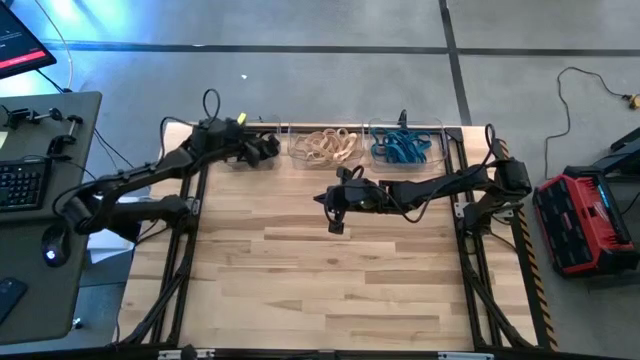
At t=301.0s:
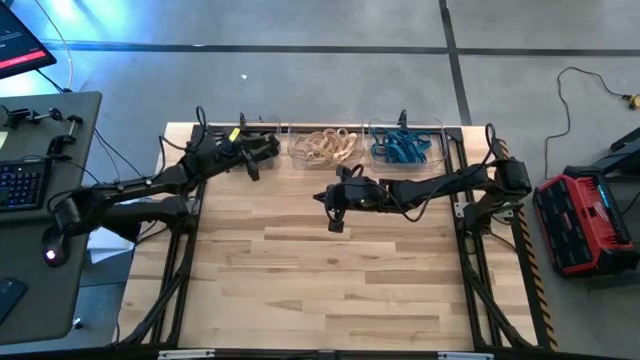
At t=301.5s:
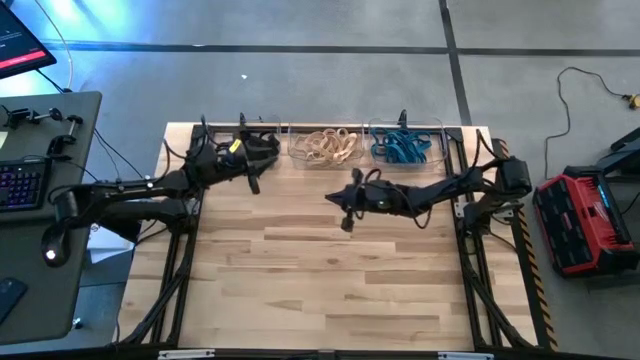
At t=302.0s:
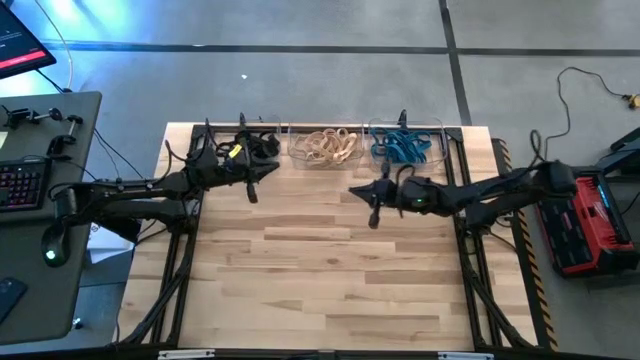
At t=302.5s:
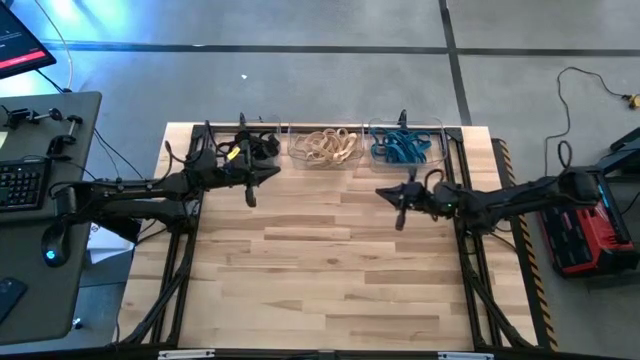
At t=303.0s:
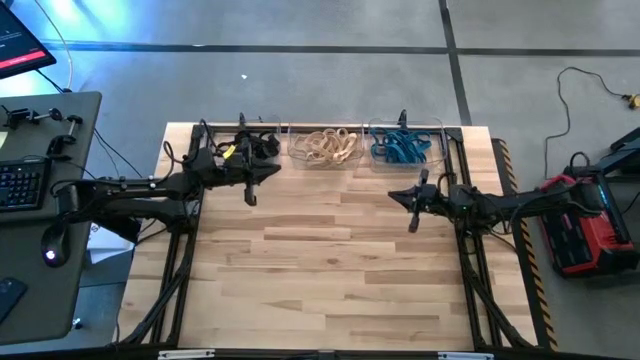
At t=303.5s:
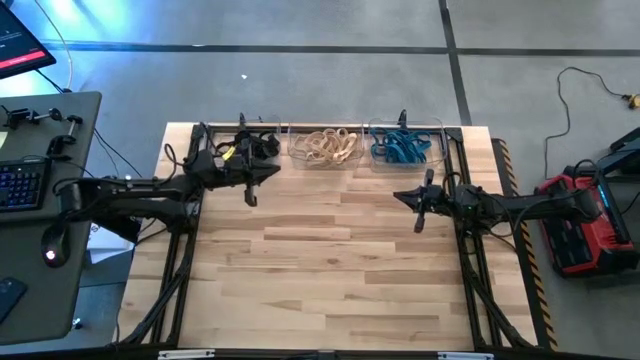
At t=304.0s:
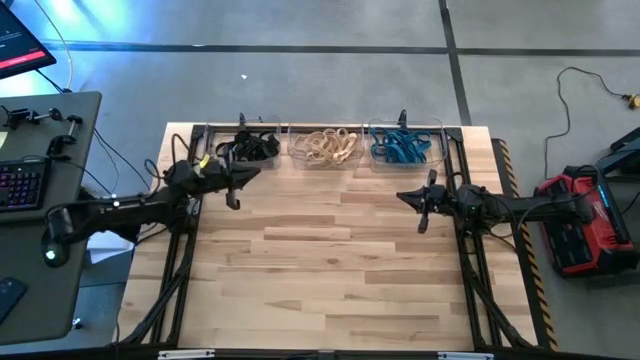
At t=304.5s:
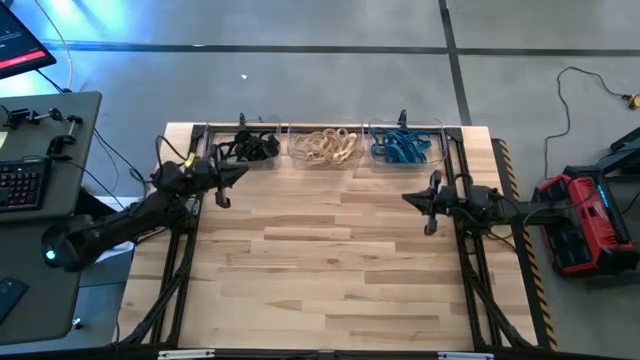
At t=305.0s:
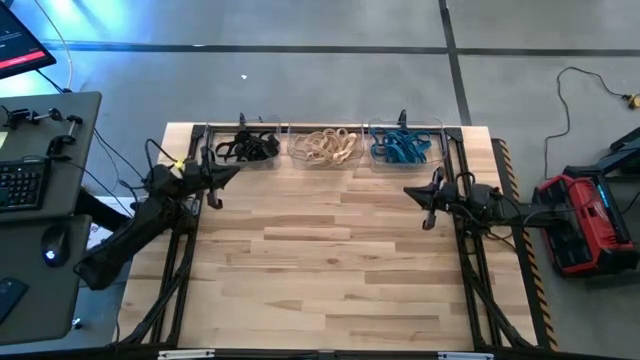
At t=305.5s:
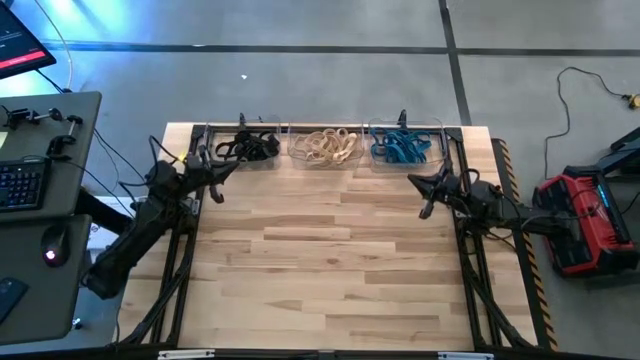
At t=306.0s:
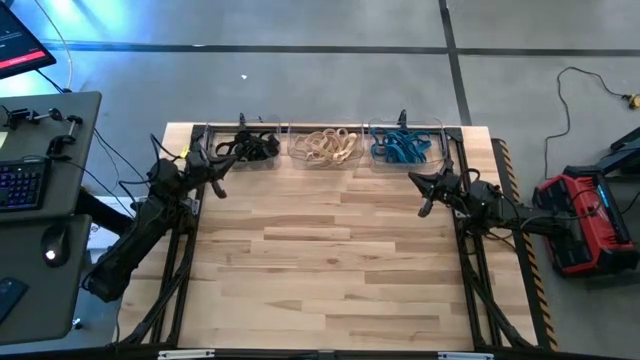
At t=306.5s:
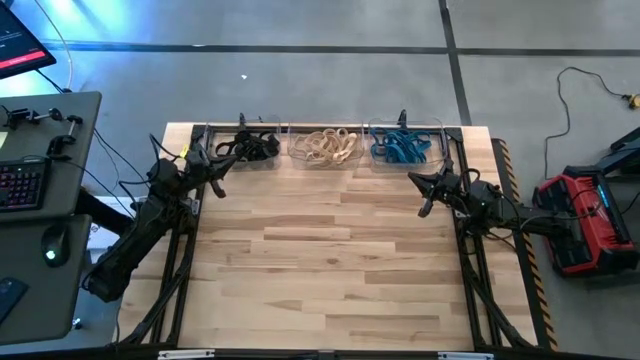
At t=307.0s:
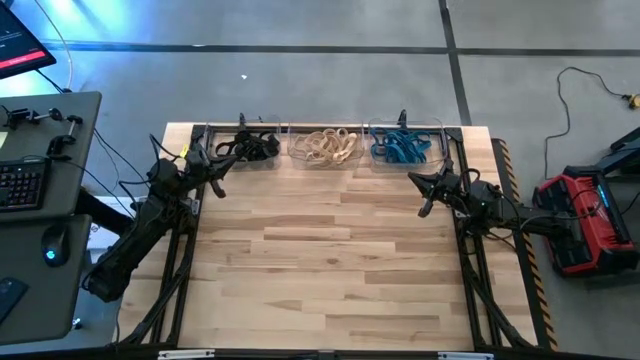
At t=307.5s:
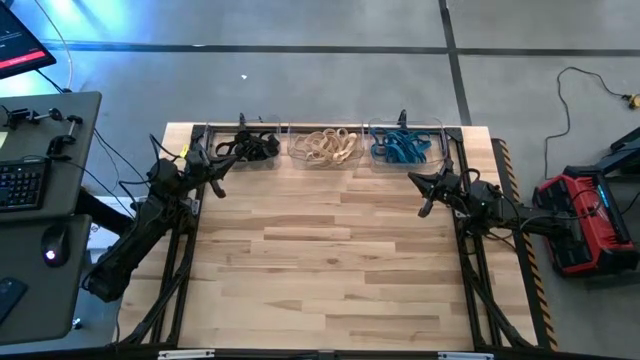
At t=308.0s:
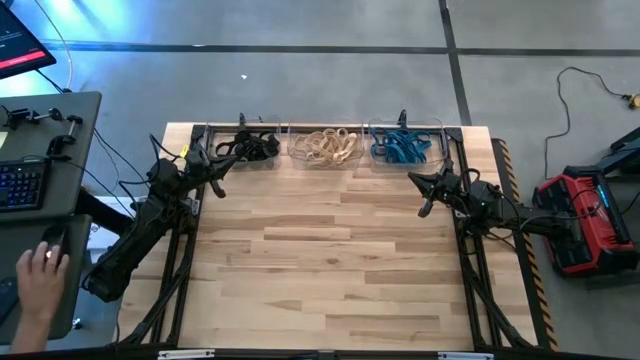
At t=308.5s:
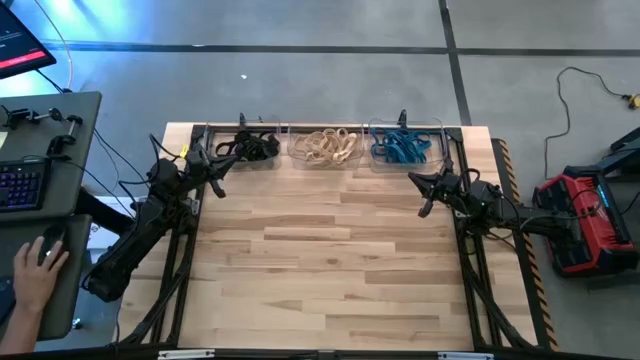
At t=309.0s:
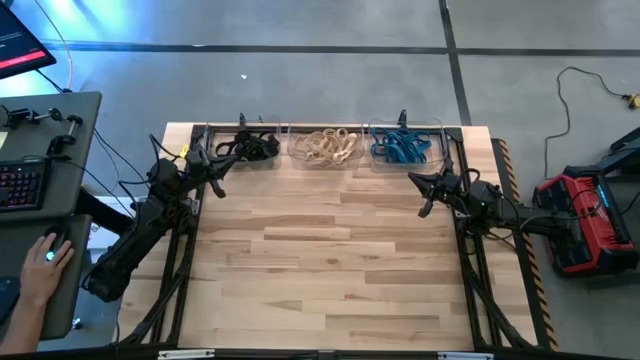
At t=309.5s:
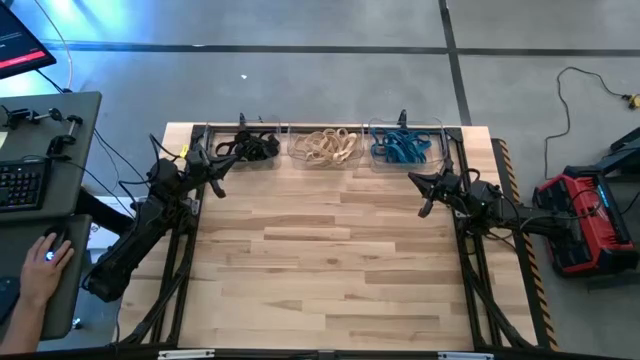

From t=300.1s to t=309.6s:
Task: Sort rubber bands into baskets
Return to Home Position

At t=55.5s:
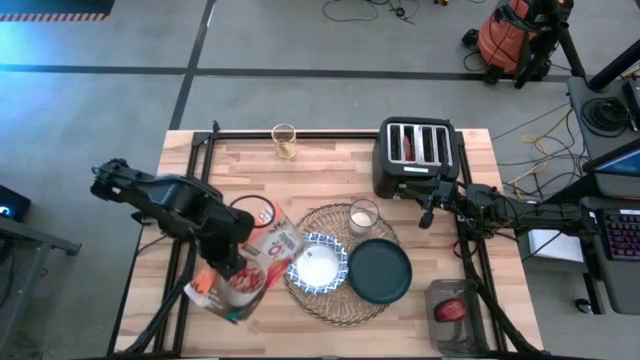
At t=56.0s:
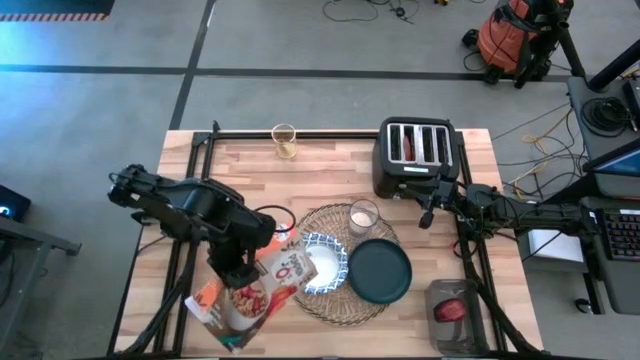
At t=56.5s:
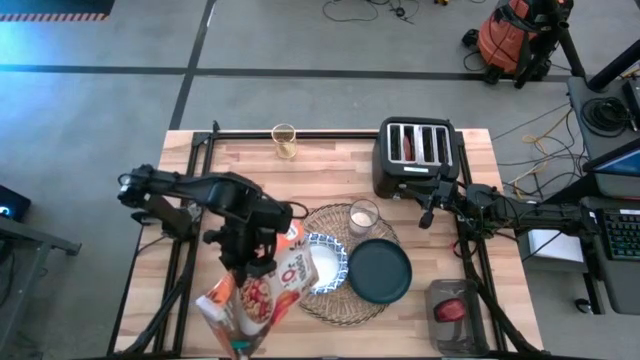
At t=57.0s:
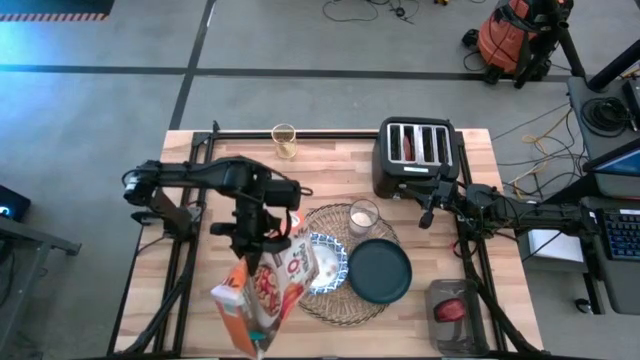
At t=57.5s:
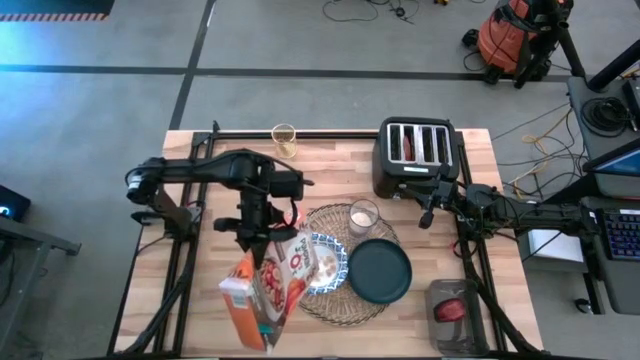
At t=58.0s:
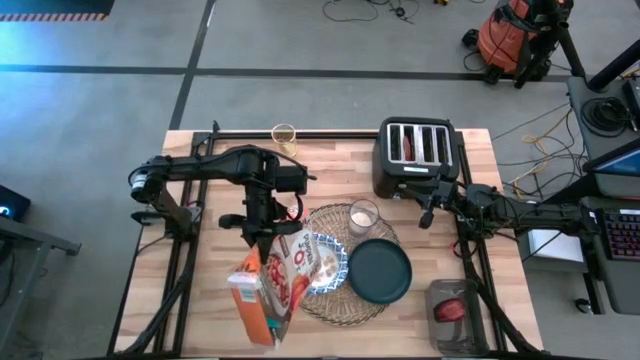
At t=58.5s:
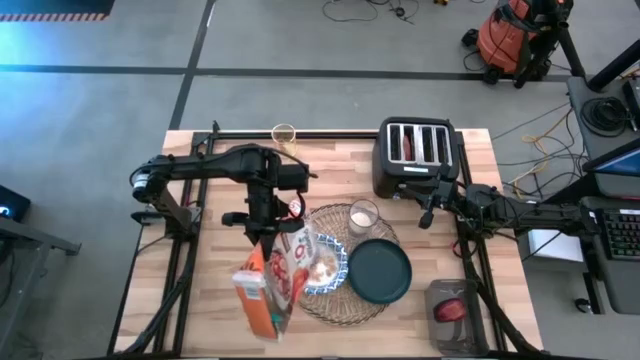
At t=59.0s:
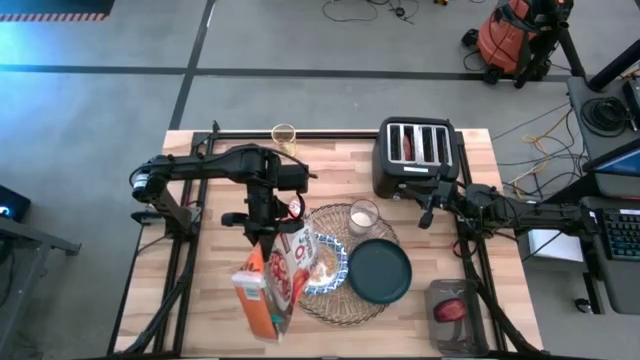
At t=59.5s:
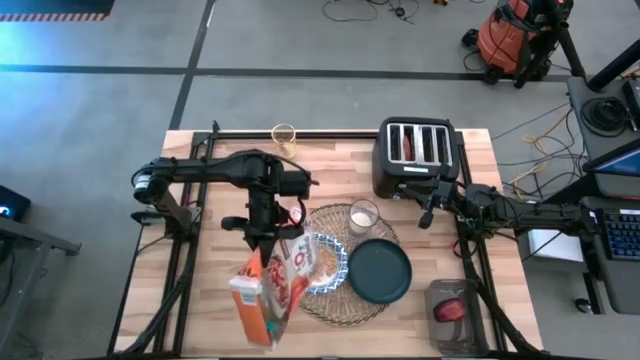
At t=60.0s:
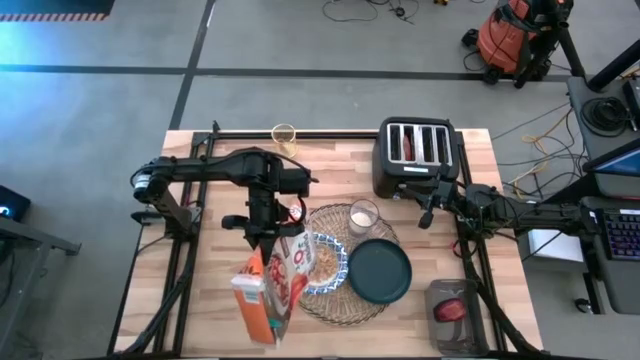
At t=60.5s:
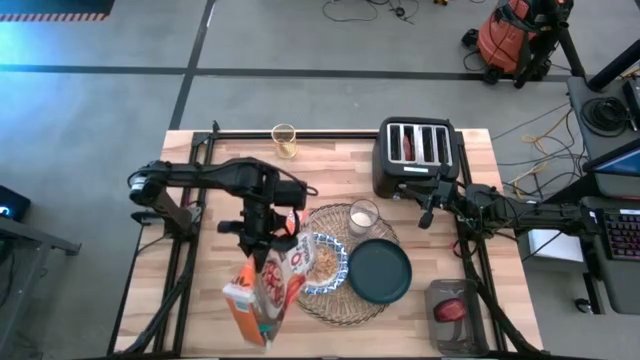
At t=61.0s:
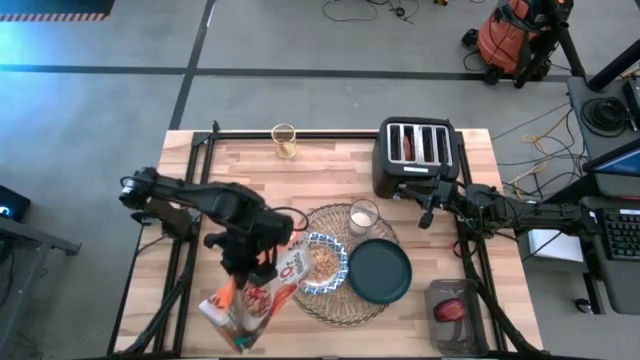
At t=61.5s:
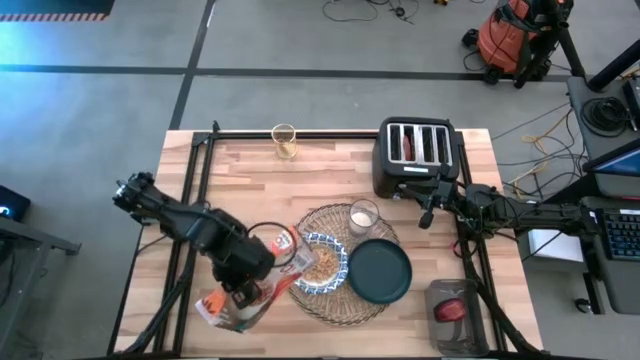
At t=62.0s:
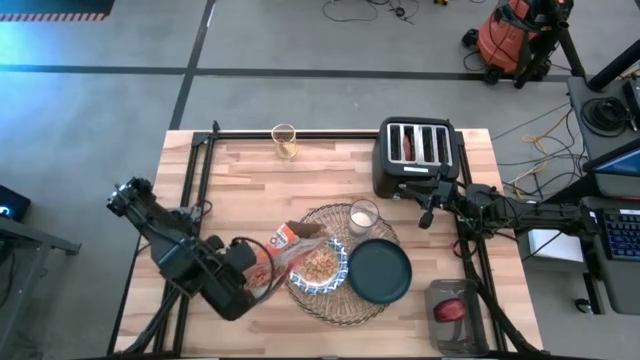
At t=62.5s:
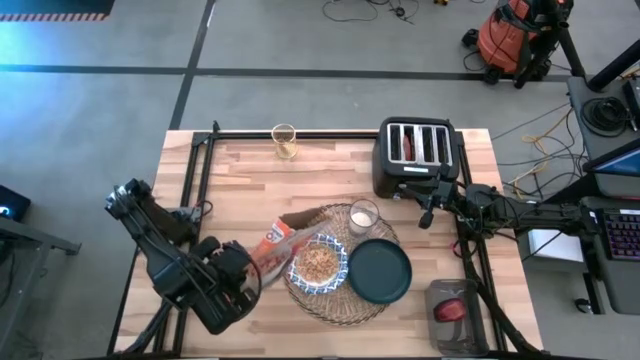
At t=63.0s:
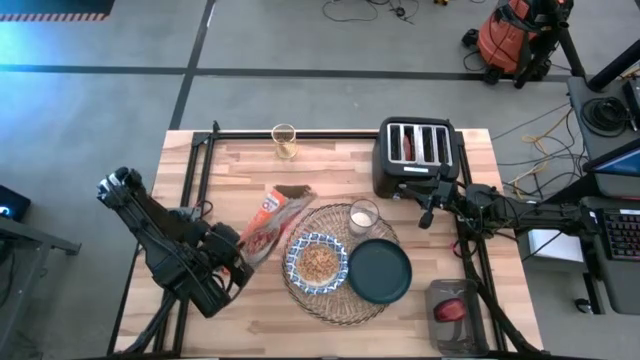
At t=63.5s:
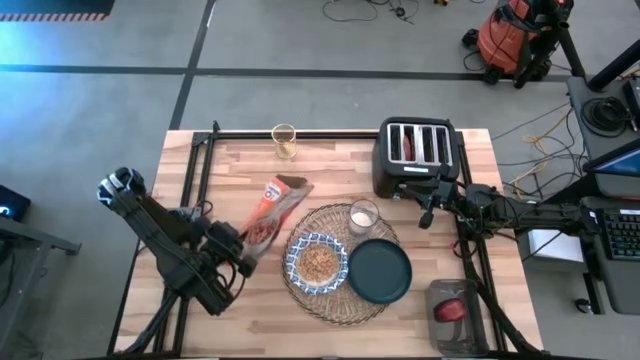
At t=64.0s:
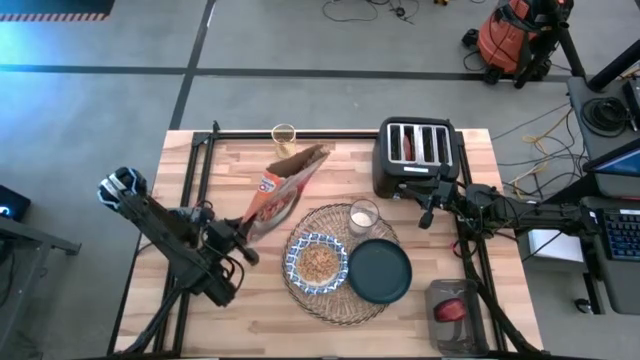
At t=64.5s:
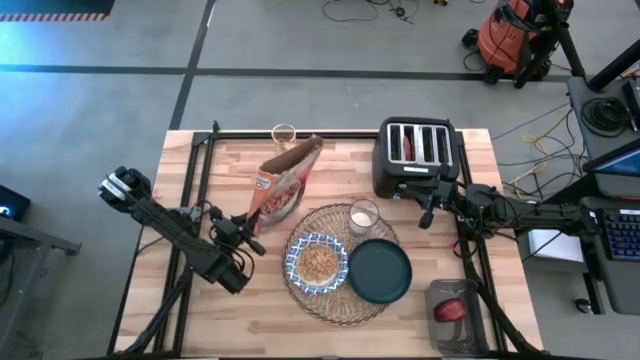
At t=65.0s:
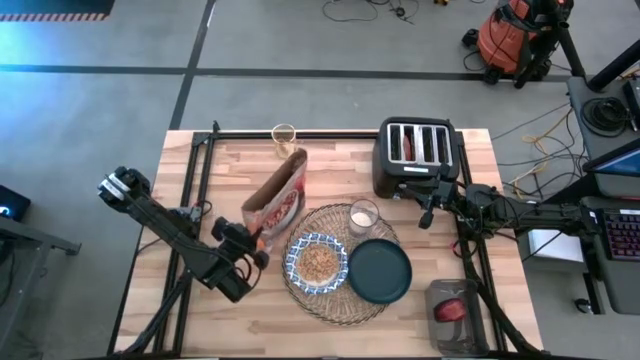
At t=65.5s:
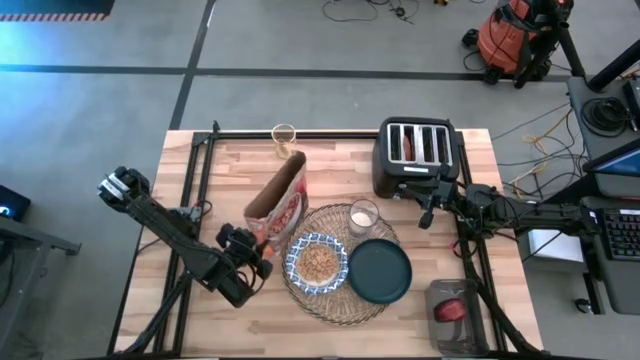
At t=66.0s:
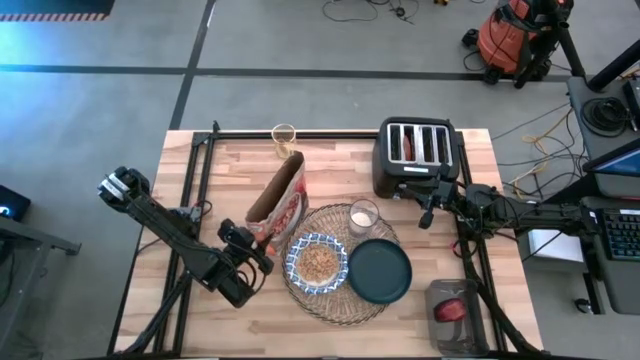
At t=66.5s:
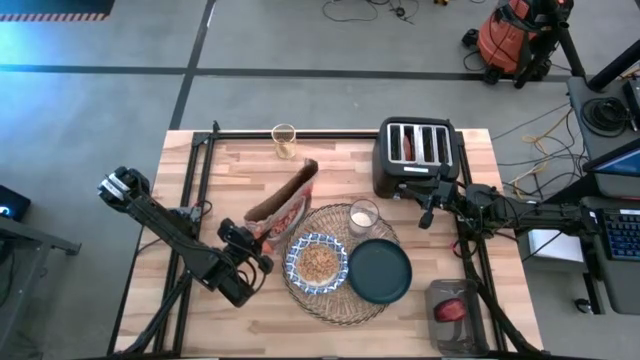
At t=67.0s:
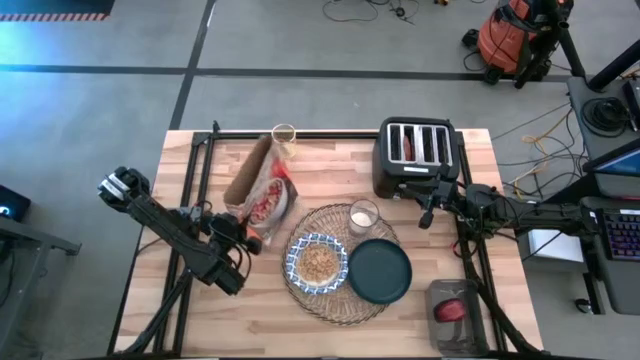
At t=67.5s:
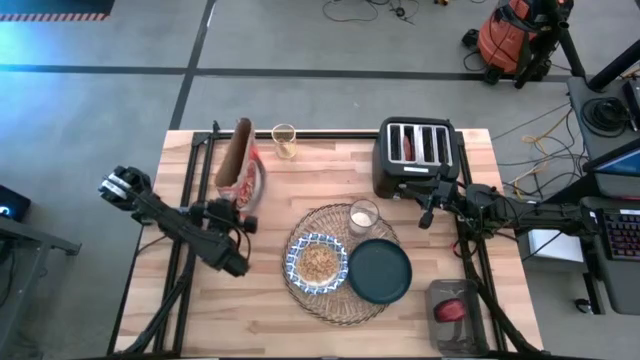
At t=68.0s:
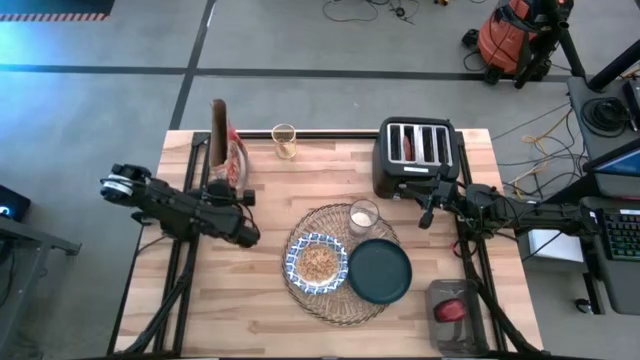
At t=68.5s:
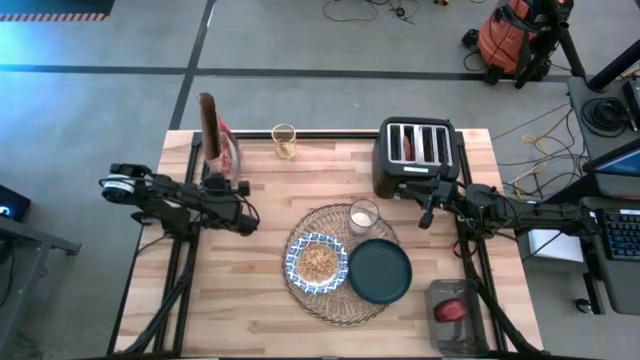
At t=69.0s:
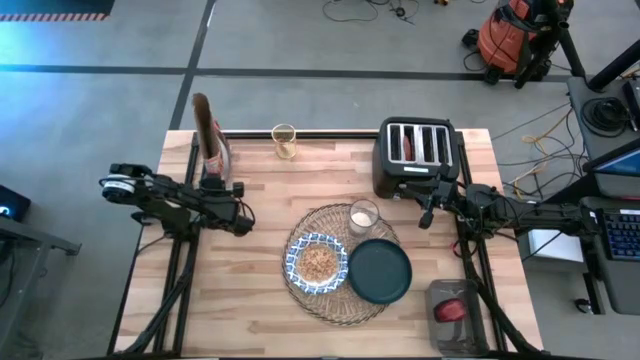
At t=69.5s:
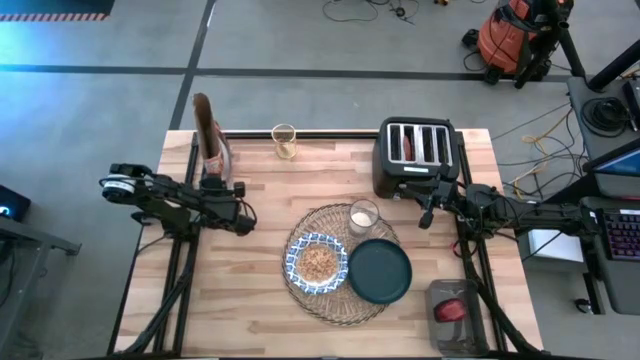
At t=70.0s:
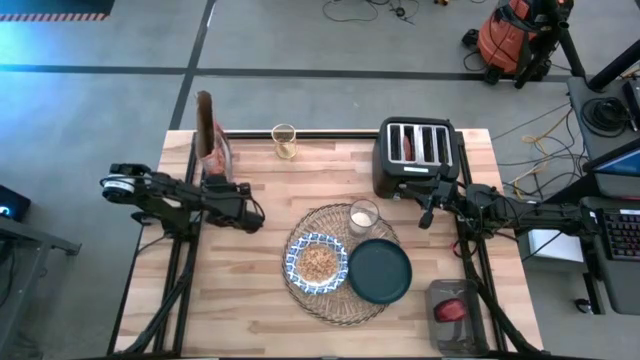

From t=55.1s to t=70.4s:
Task: Arrange a breakfast setting
Pour the brown cereal from the orange cereal box into the white patterned bowl
